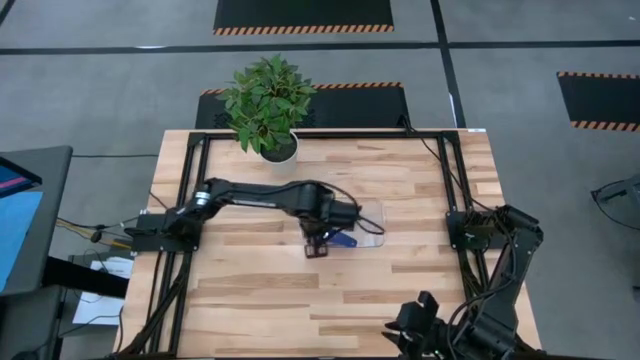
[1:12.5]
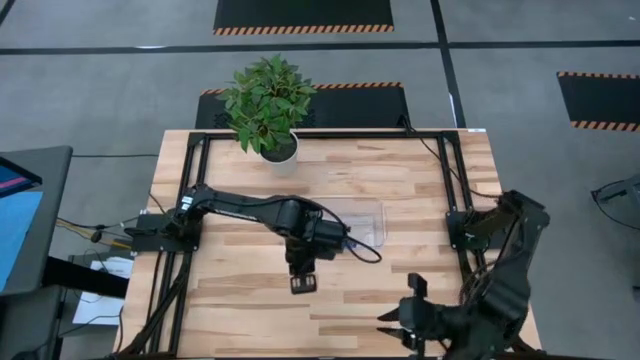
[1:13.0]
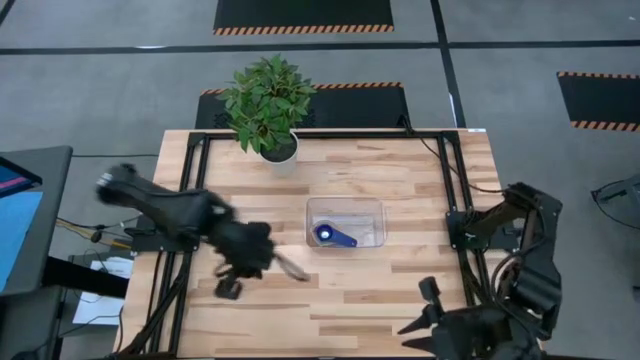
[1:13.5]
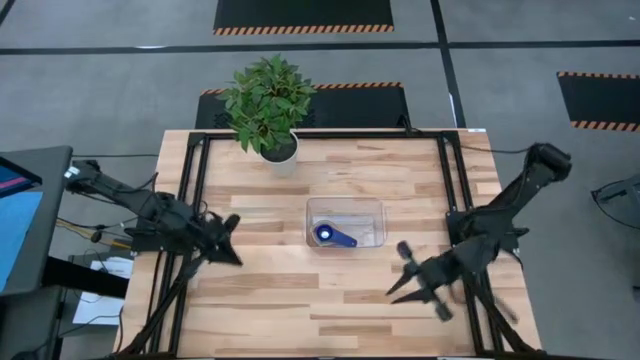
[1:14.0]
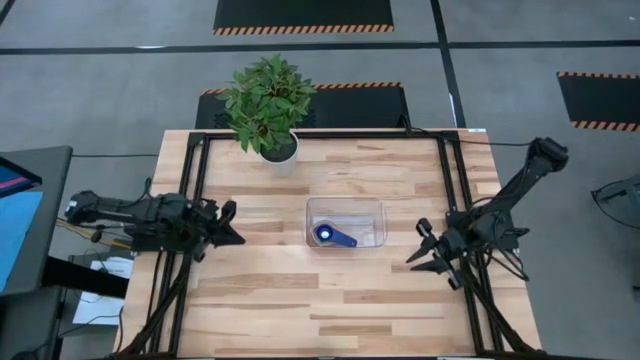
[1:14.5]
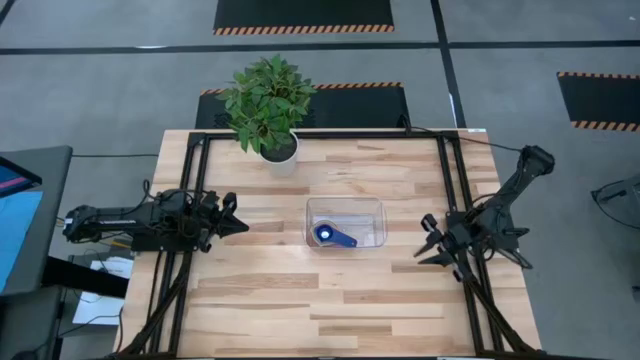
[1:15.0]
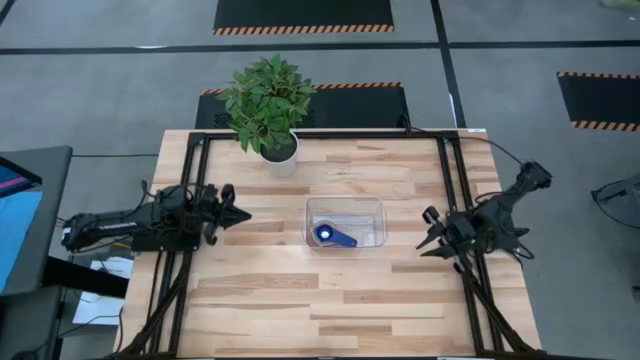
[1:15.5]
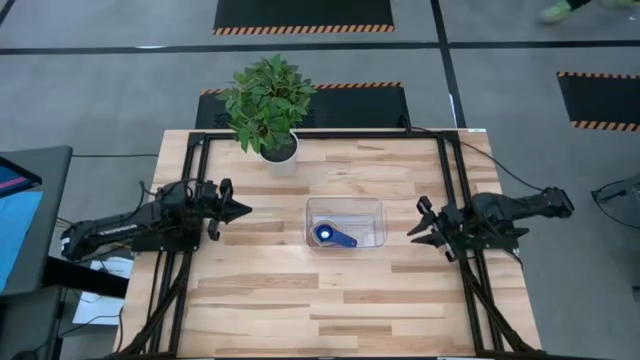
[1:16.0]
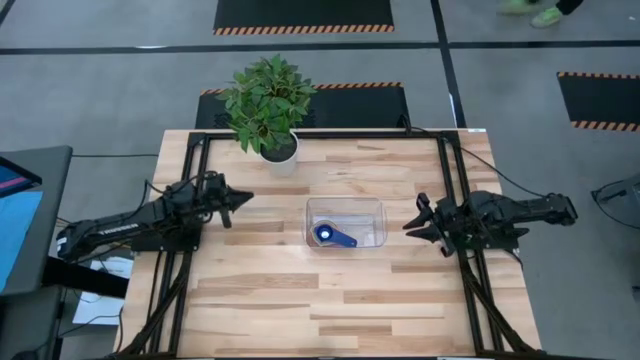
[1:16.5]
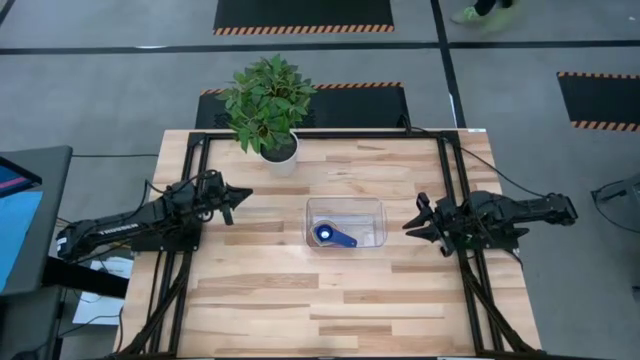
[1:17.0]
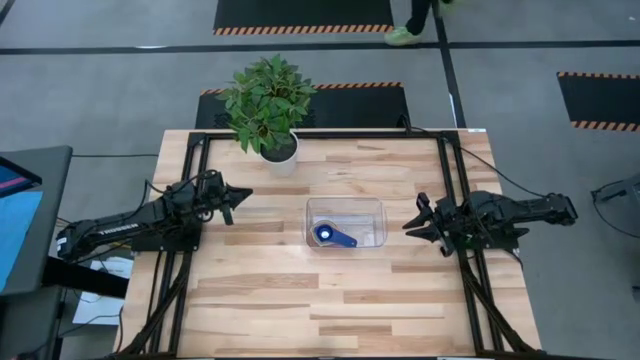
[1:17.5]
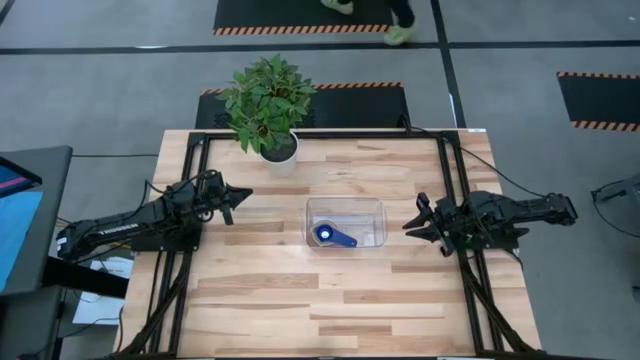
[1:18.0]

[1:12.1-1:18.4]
Task: Nest measuring cups in basket
Return to Home Position

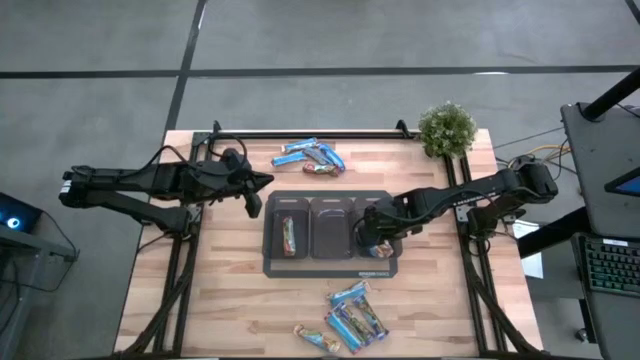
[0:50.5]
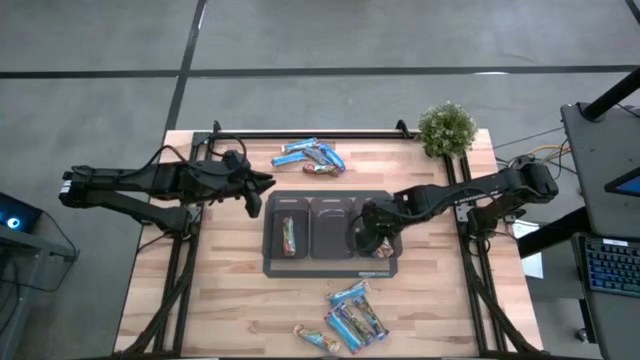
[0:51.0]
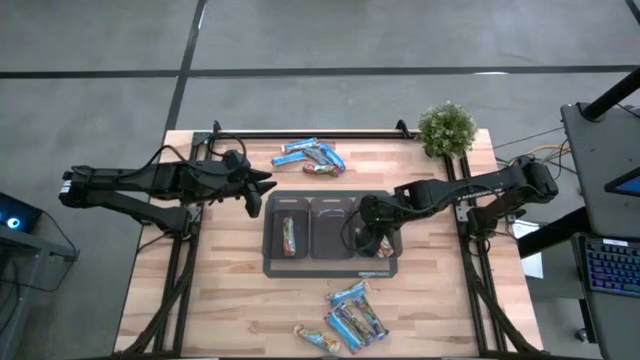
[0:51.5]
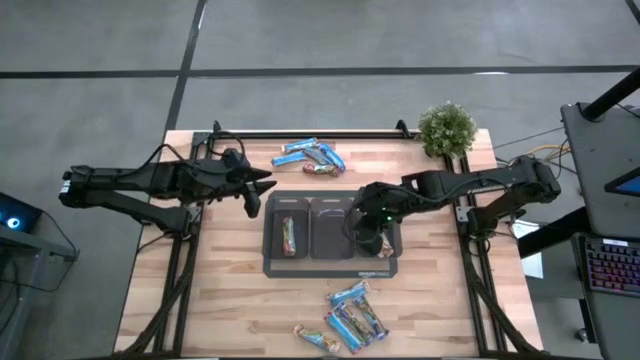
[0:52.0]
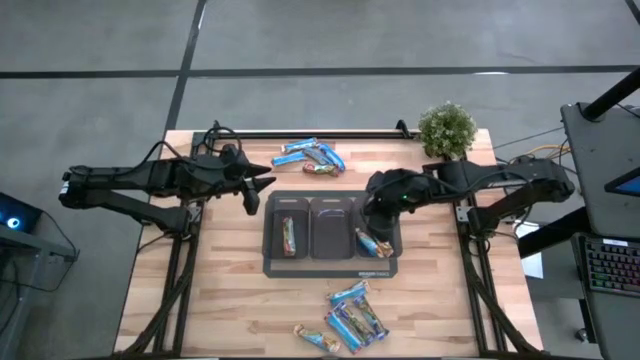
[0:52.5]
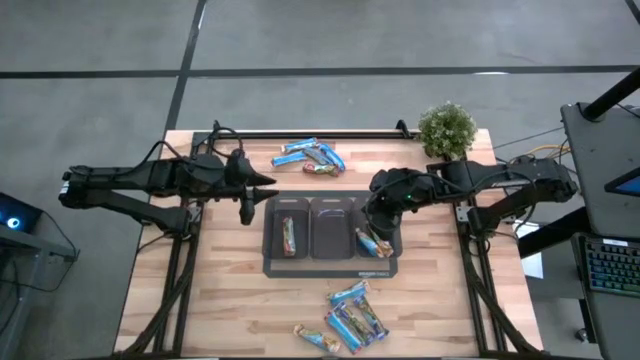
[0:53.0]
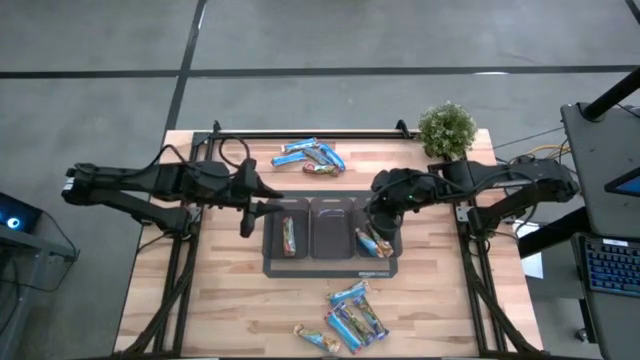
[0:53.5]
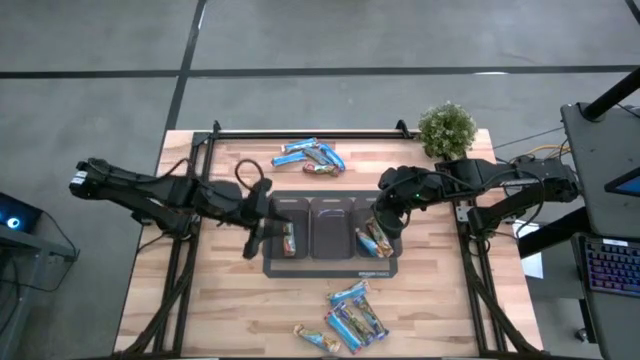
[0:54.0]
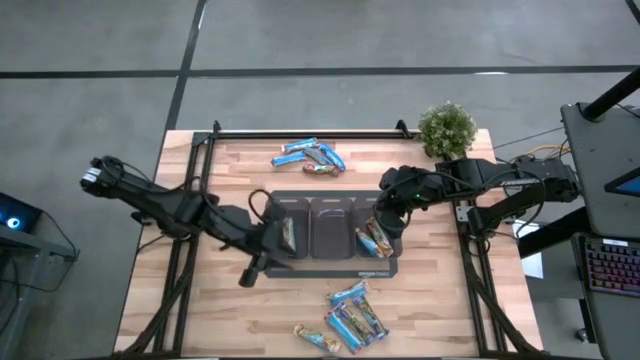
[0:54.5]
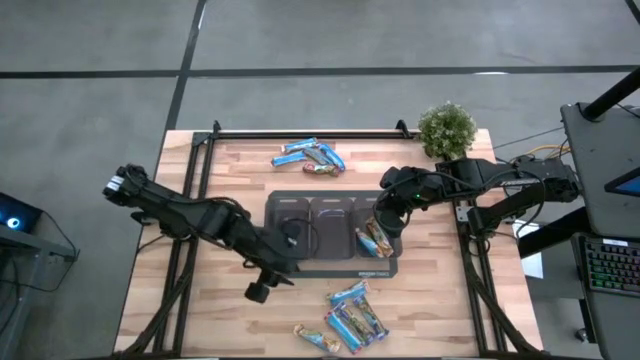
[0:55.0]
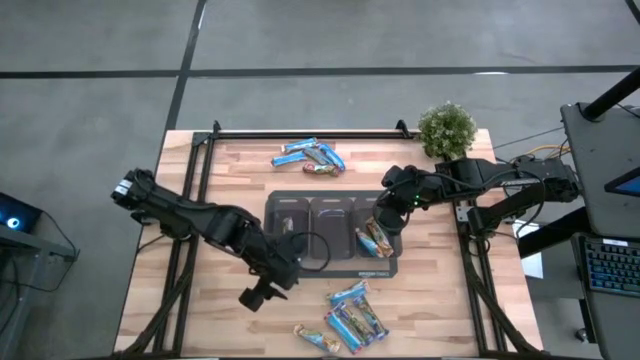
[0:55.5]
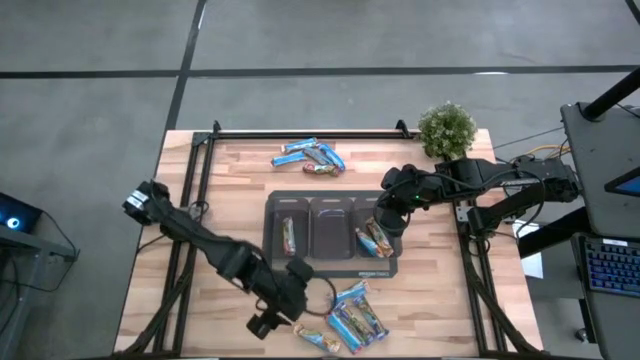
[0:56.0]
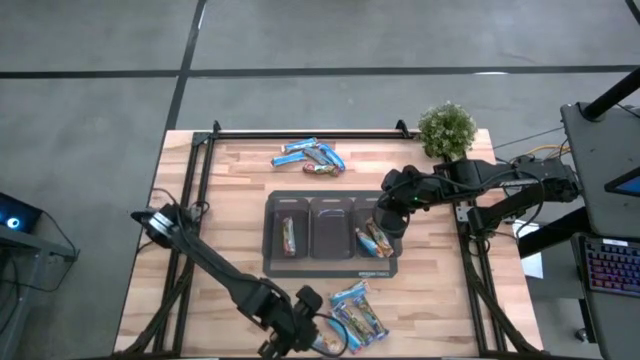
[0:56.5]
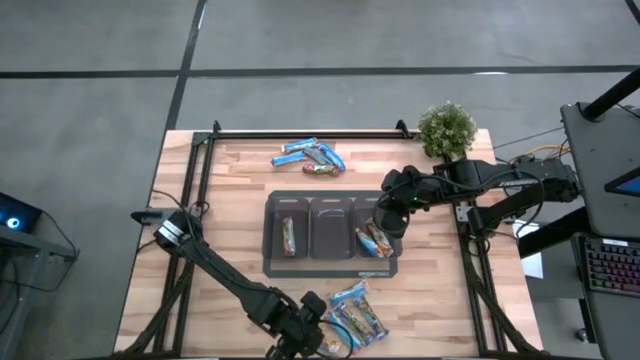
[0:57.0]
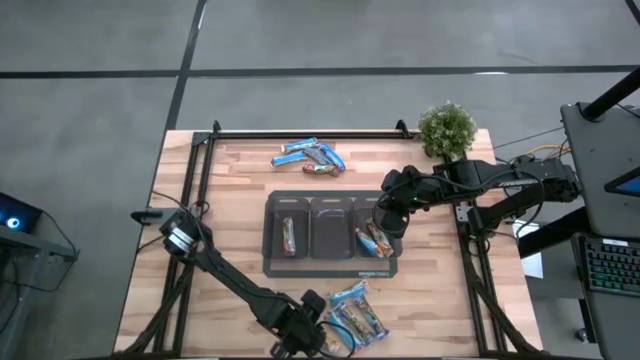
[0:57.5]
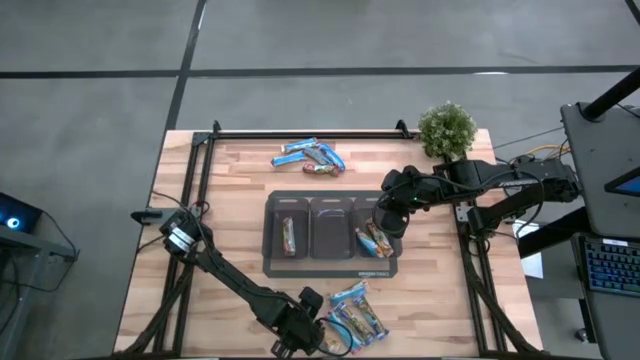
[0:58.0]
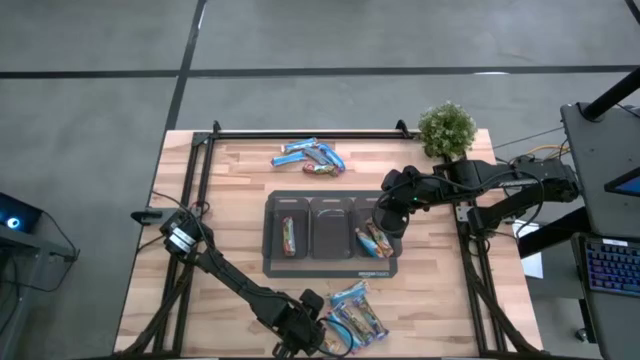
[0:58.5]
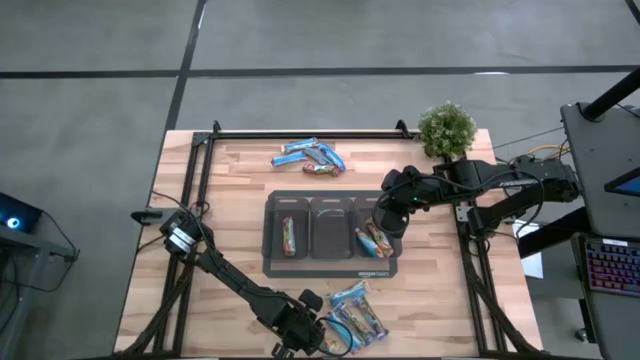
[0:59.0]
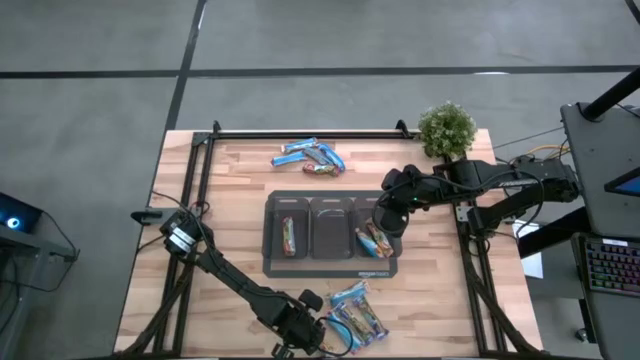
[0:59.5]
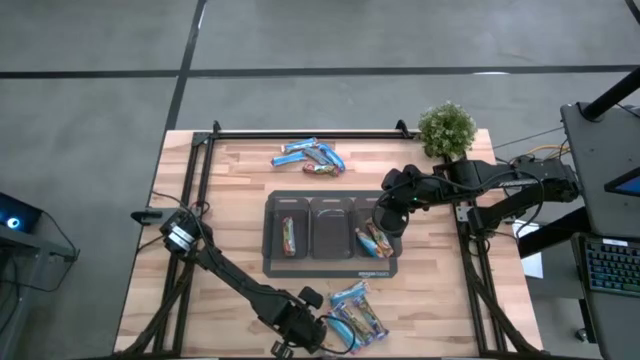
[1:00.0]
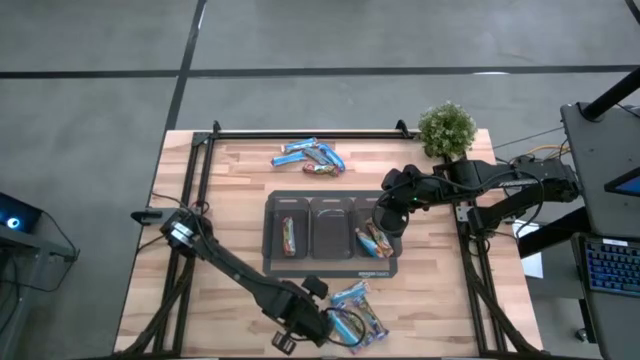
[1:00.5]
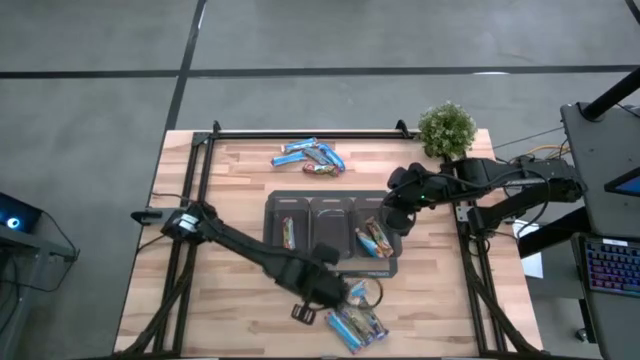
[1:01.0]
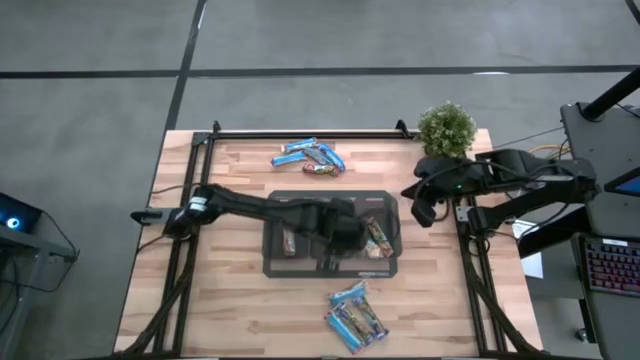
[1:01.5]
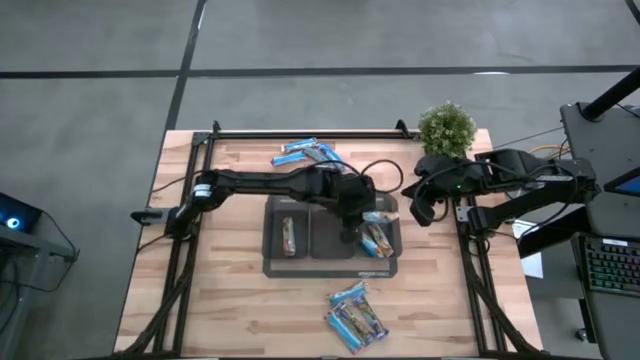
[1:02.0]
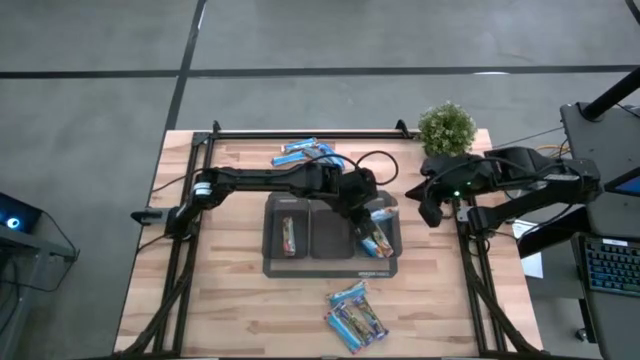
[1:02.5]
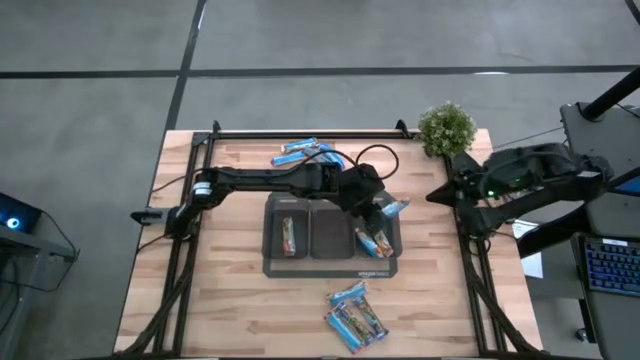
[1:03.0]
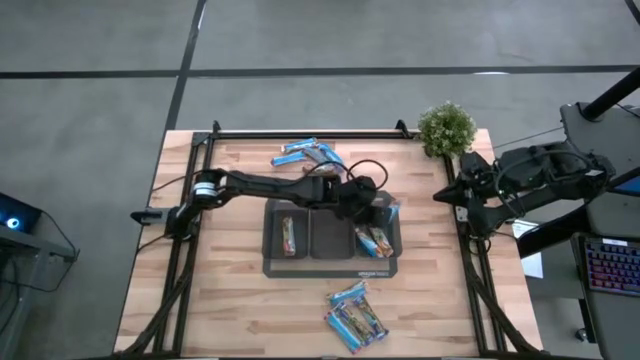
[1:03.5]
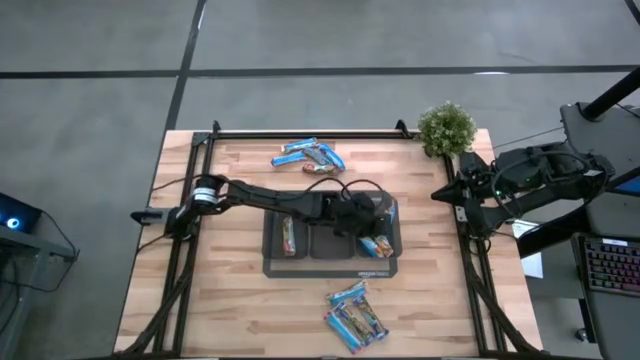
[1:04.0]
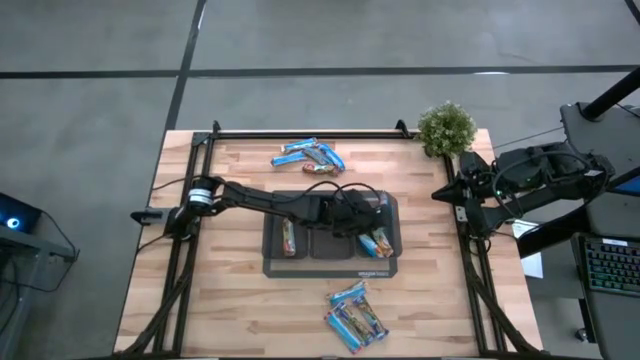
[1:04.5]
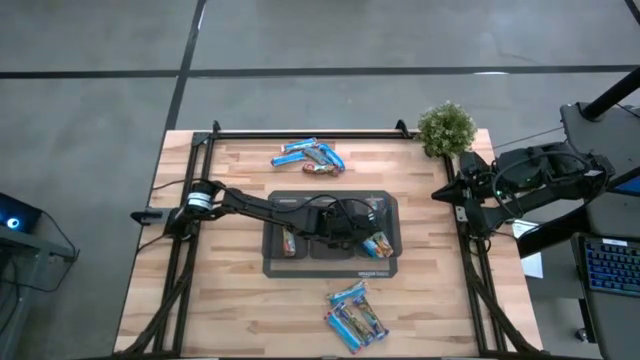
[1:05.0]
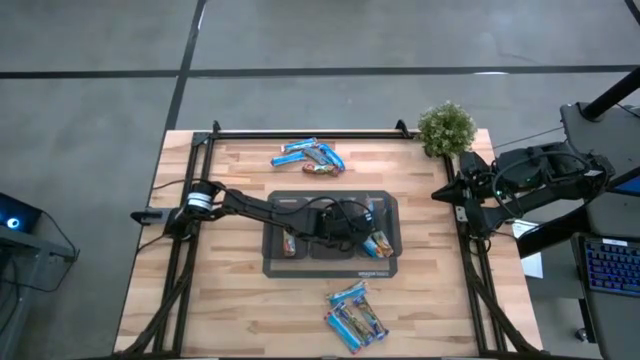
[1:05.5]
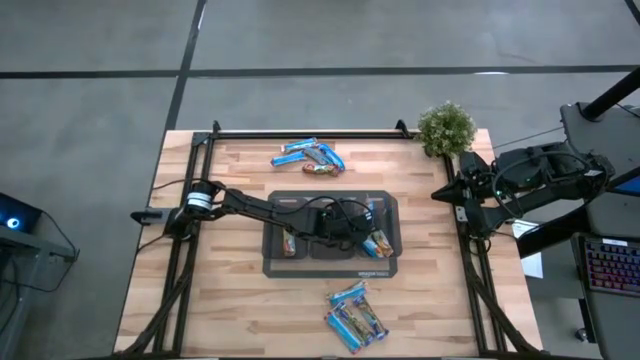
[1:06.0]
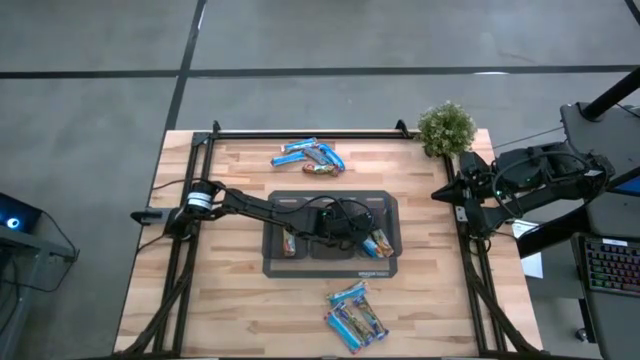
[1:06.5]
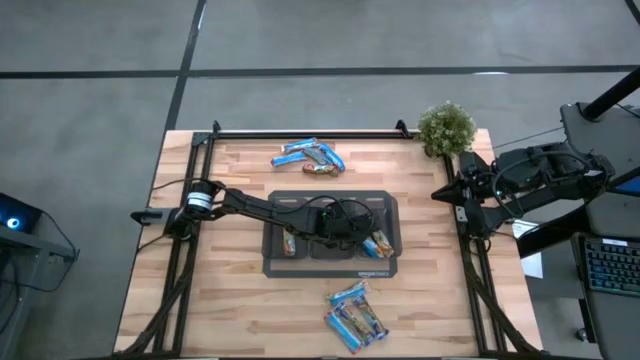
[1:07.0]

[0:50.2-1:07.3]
Task: Pick and place Granola Bars by type
Put the yellow granola bar into the right black bin
